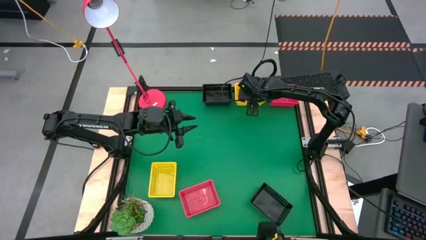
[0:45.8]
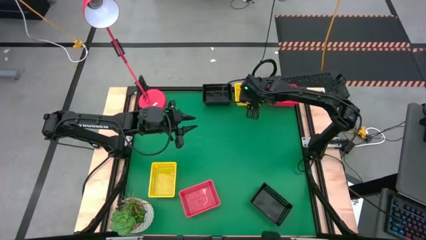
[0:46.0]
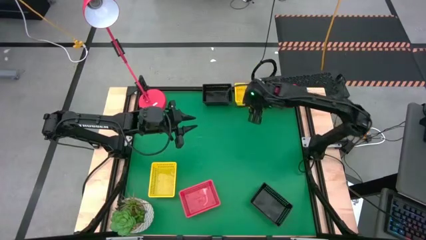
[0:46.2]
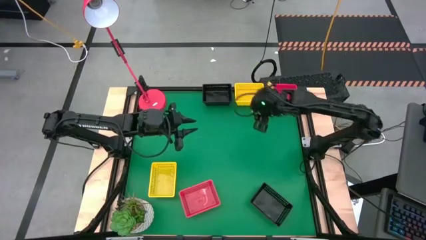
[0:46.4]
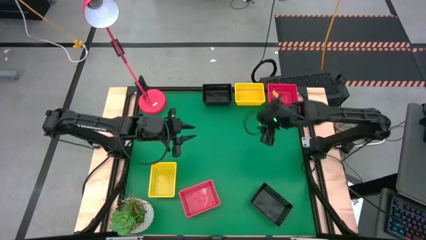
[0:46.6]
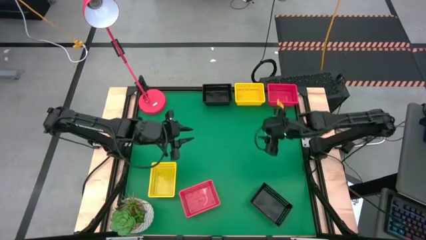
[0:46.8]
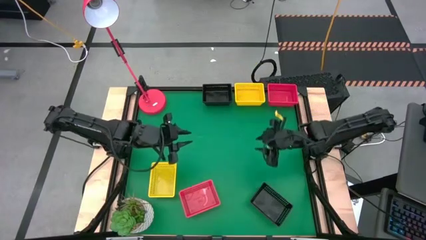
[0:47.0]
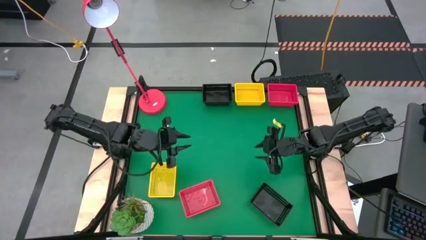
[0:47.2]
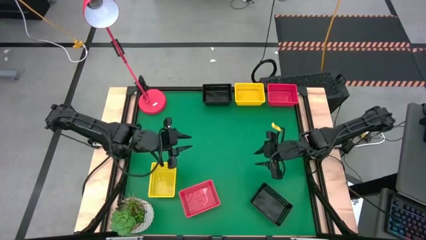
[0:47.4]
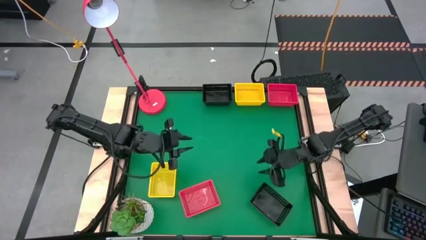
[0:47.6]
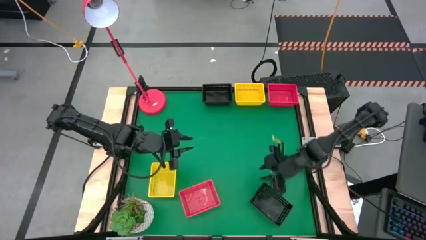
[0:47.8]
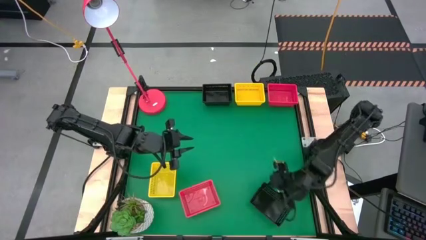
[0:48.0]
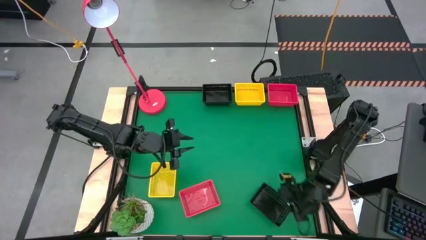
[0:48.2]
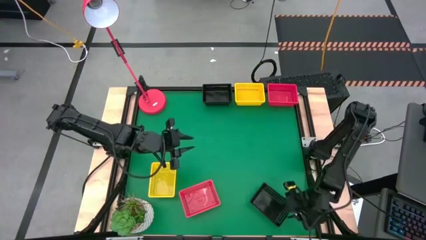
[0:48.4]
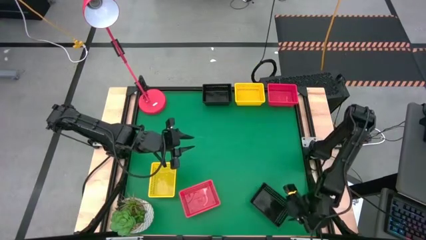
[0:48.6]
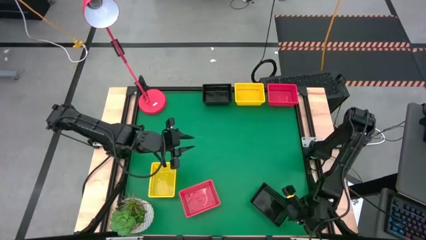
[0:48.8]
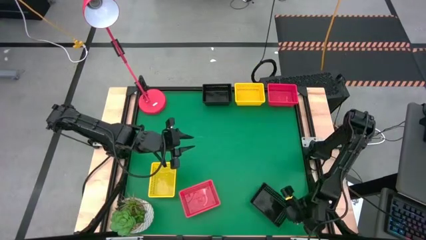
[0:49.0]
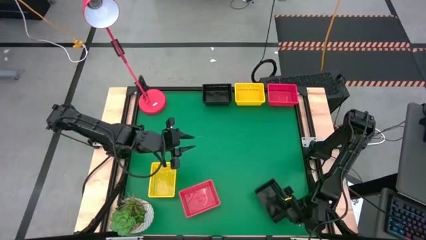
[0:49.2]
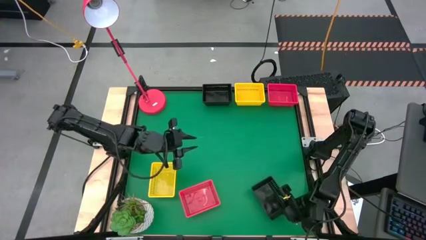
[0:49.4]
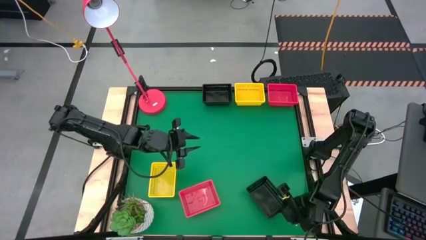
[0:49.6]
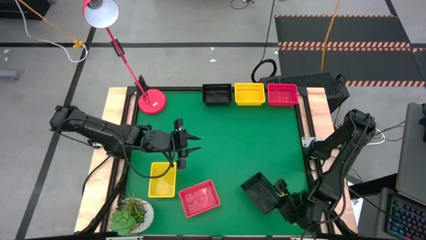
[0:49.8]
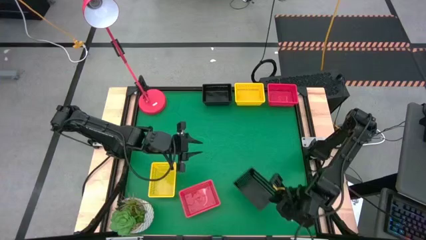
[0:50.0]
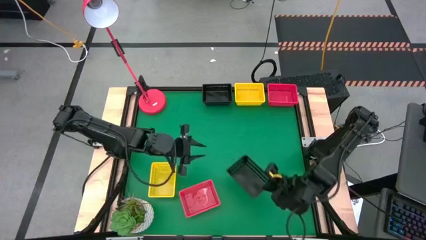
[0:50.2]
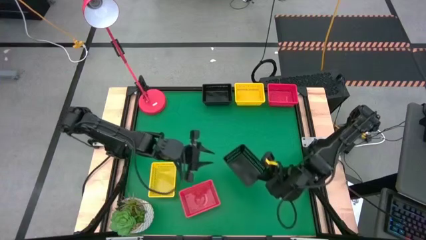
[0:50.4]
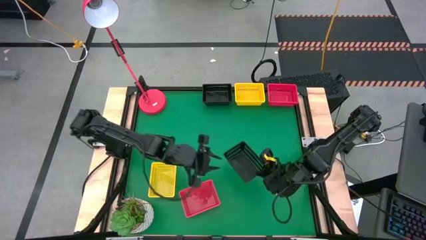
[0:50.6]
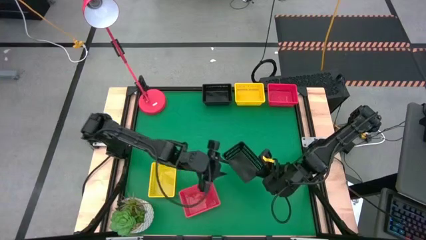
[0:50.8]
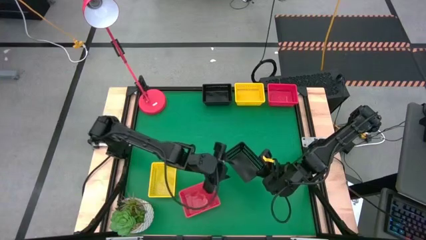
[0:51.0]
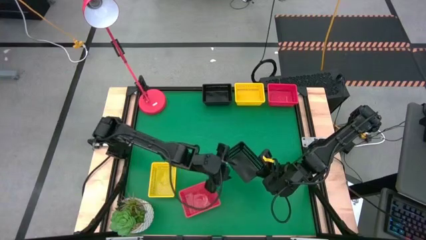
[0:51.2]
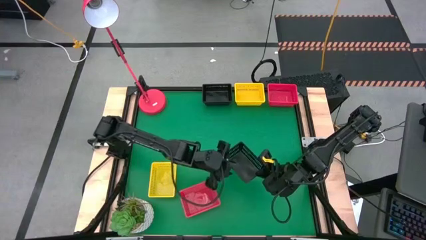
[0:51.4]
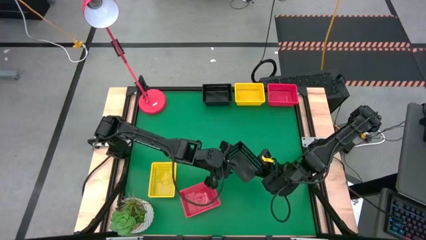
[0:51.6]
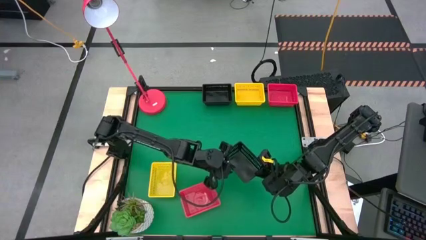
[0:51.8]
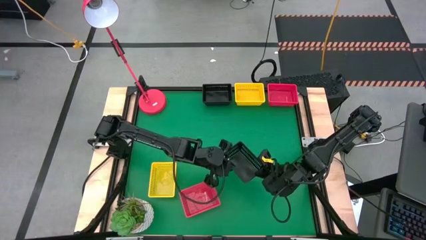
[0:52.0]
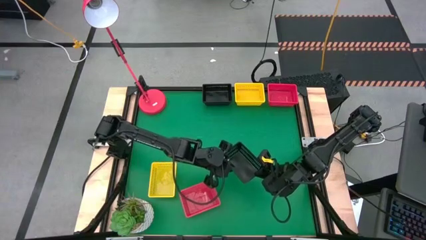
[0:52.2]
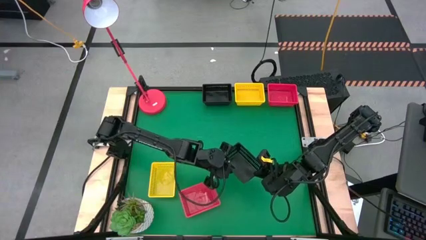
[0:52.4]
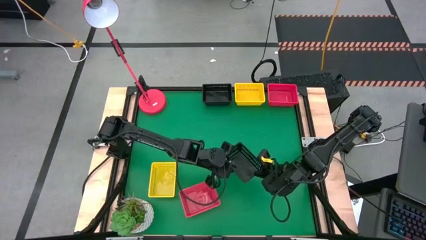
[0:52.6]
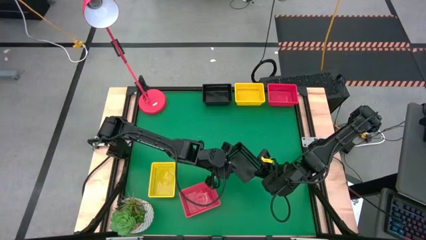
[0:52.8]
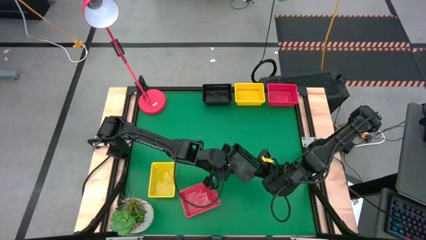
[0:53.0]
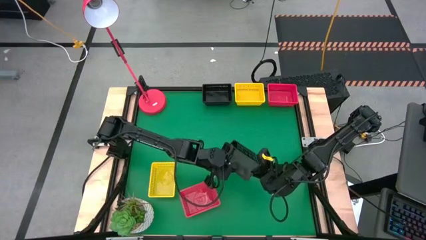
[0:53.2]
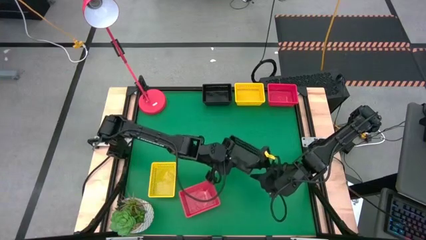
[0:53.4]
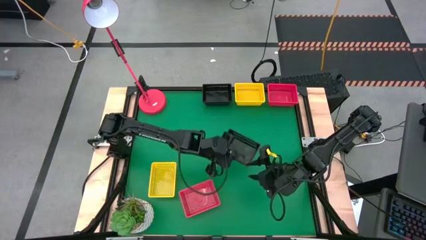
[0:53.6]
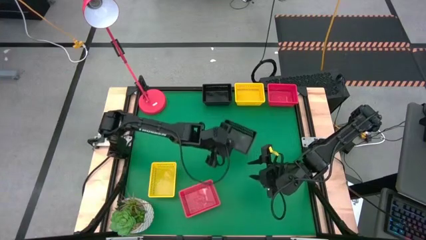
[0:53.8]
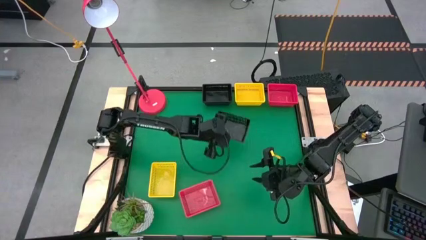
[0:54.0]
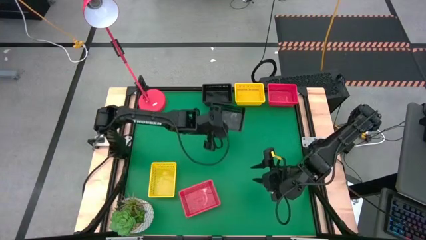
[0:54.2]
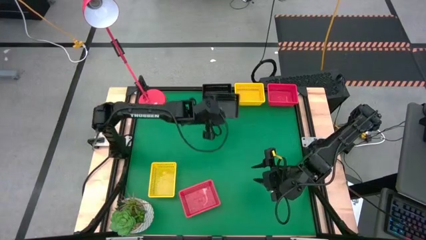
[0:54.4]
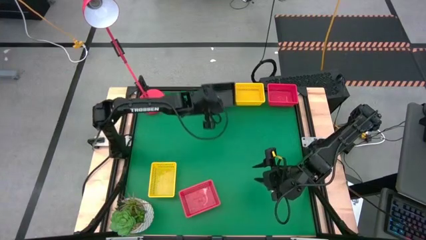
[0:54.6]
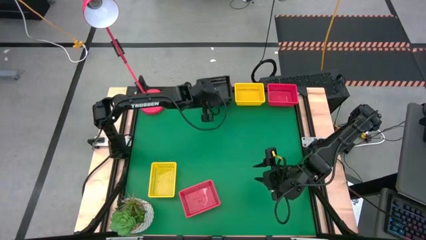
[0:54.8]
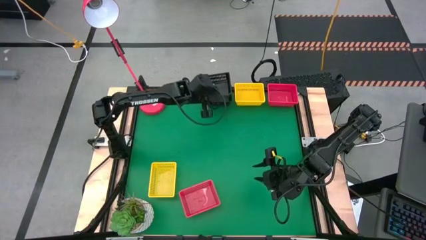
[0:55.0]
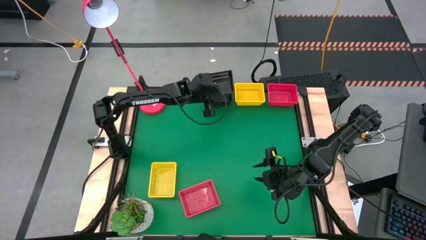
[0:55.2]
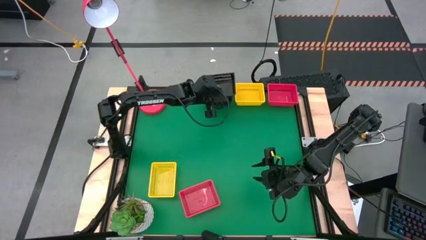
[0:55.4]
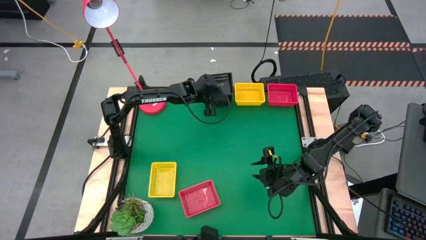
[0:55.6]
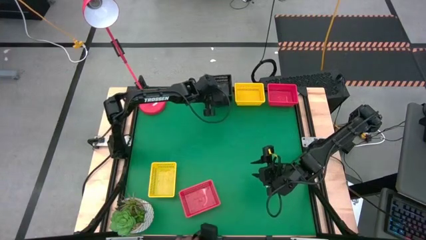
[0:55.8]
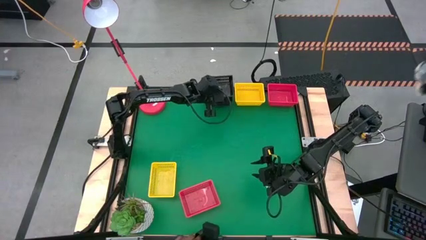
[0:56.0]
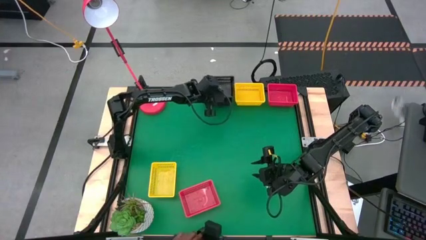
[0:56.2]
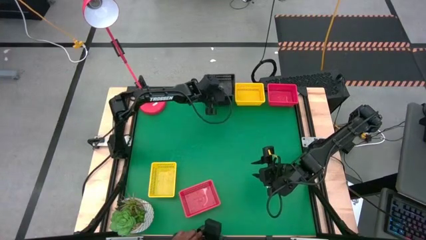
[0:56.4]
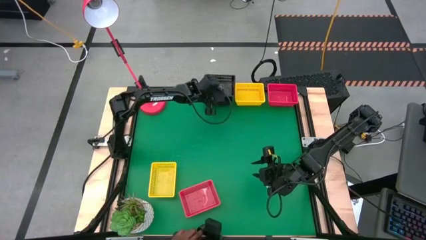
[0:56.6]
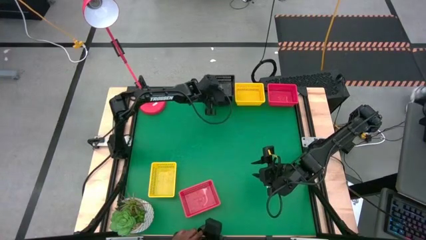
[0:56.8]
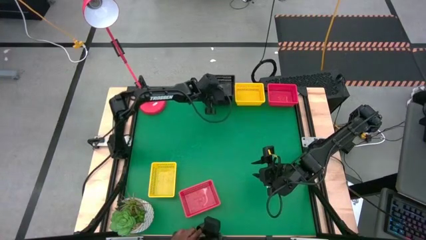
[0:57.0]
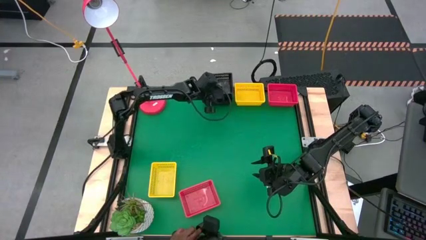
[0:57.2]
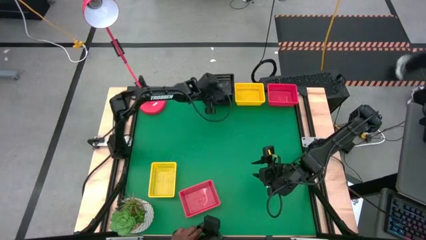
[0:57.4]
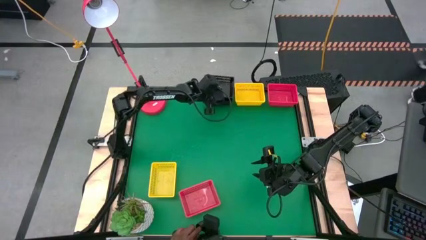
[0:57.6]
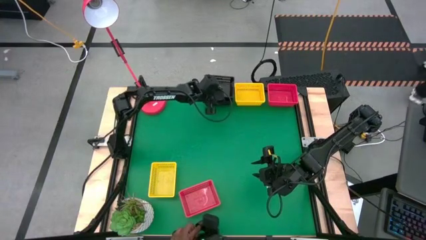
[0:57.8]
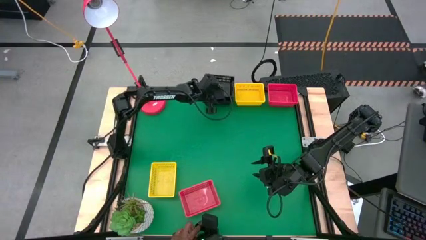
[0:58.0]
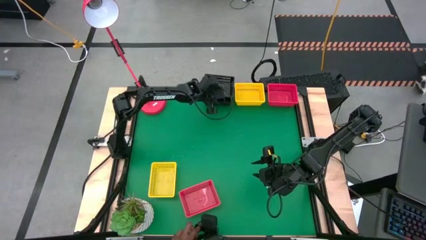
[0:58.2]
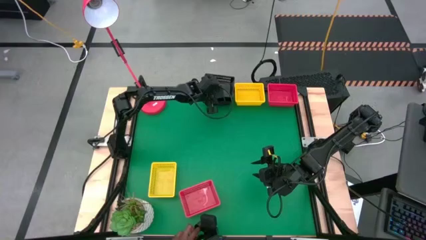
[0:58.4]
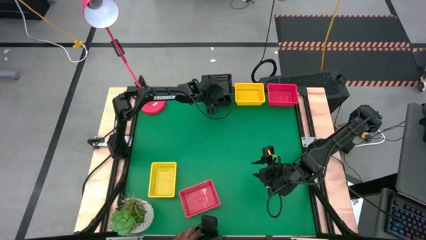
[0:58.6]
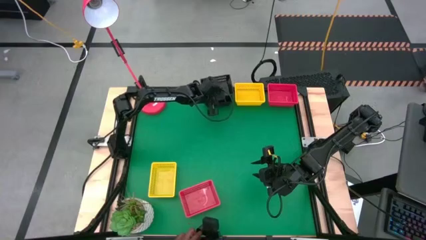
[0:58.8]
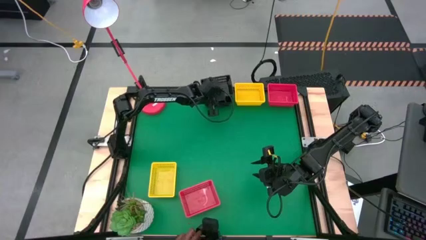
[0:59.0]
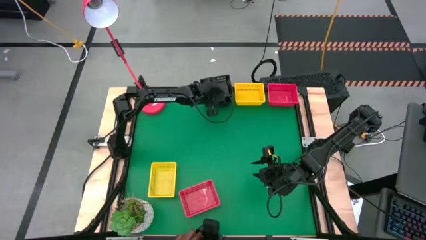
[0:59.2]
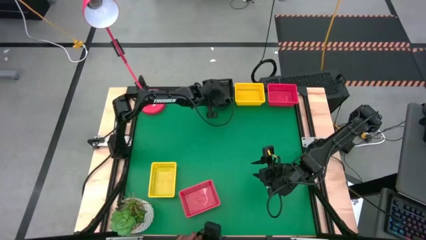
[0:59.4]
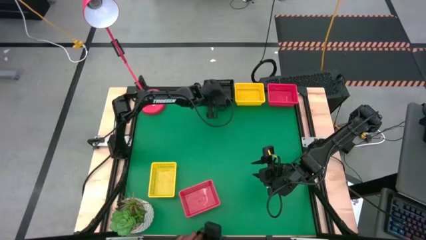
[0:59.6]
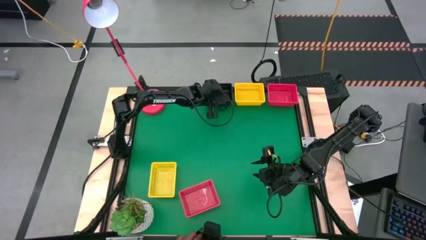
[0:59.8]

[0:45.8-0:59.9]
Stack the bottom black bin on the top black bins
